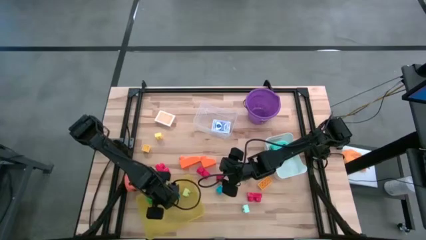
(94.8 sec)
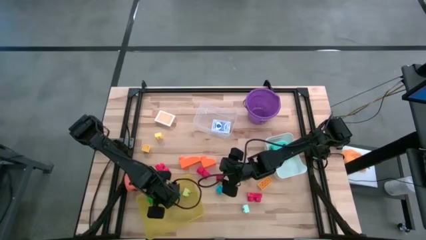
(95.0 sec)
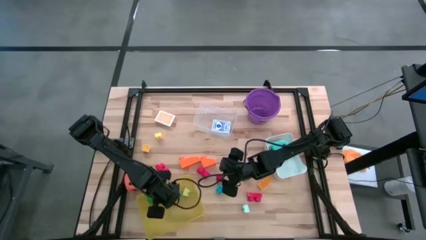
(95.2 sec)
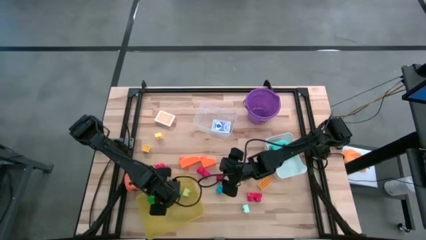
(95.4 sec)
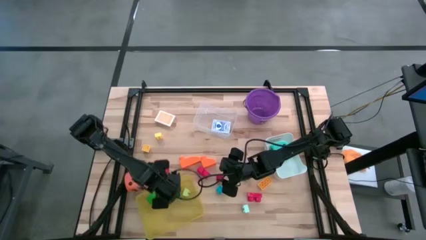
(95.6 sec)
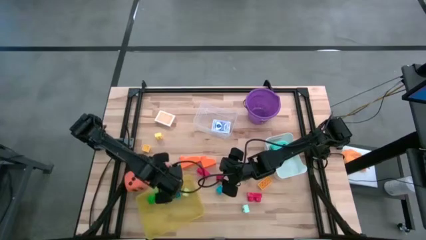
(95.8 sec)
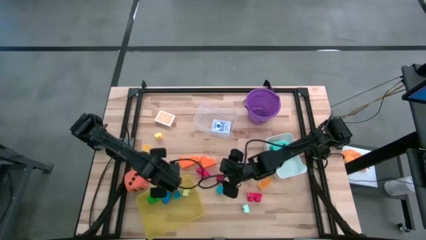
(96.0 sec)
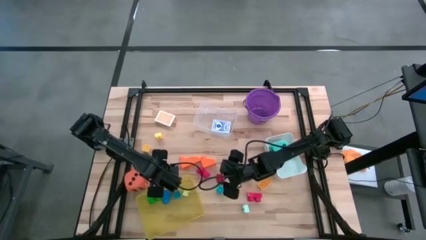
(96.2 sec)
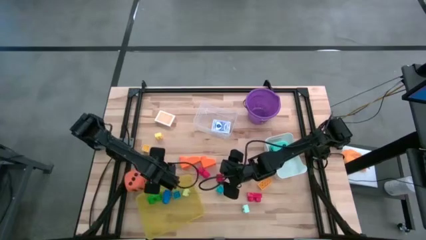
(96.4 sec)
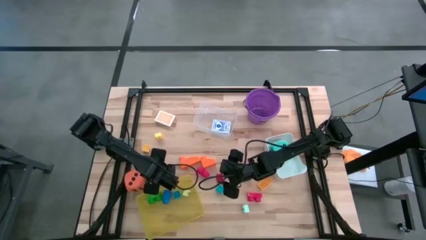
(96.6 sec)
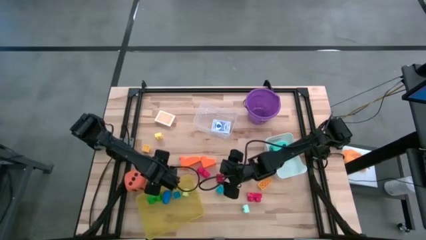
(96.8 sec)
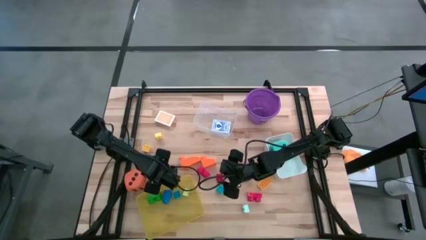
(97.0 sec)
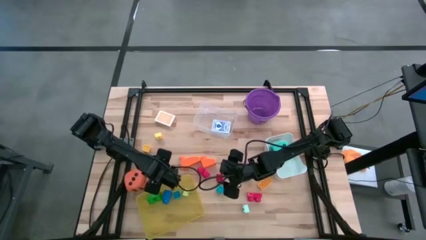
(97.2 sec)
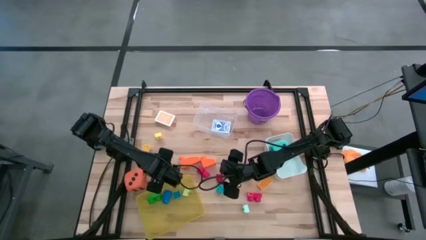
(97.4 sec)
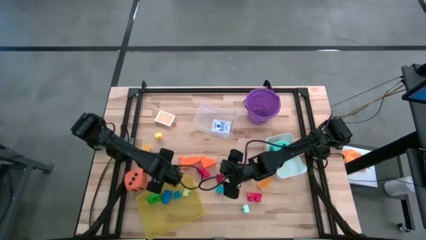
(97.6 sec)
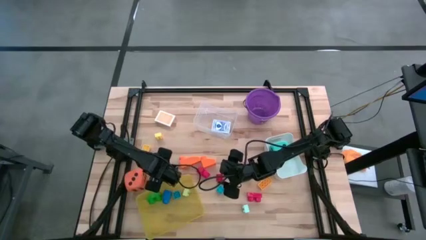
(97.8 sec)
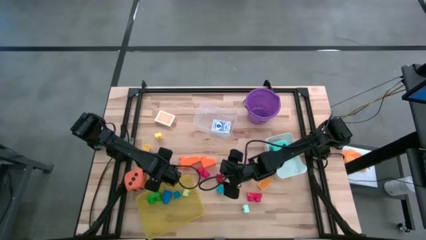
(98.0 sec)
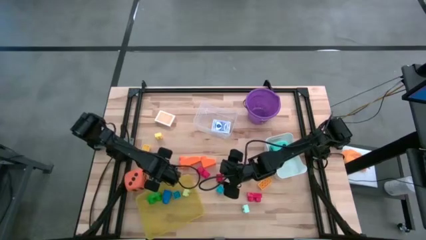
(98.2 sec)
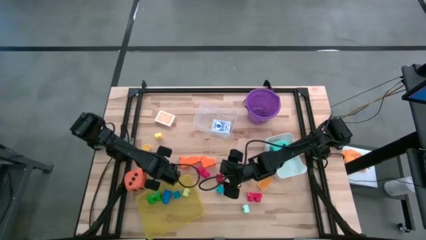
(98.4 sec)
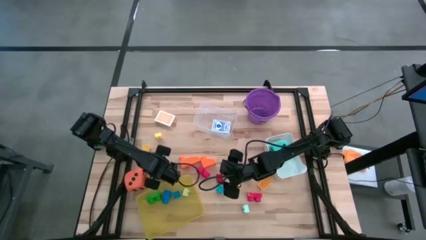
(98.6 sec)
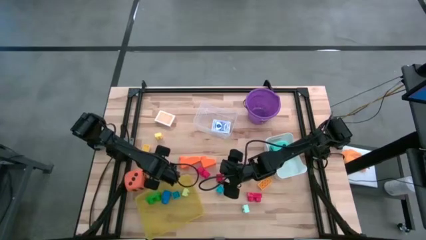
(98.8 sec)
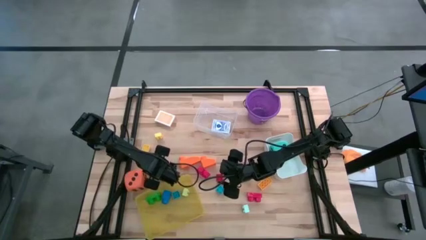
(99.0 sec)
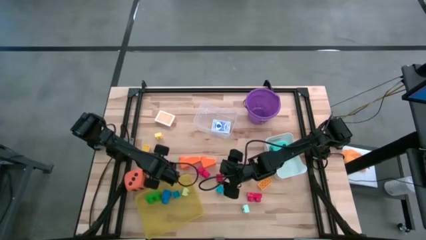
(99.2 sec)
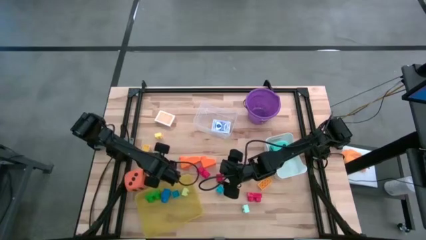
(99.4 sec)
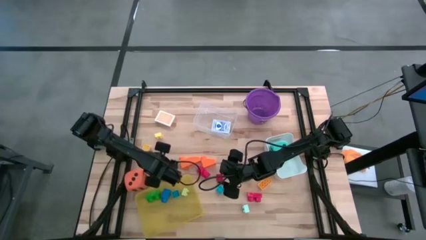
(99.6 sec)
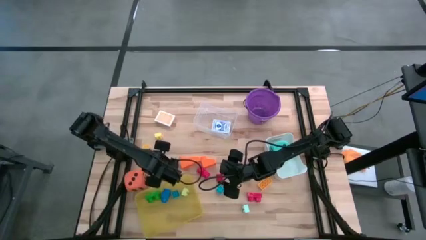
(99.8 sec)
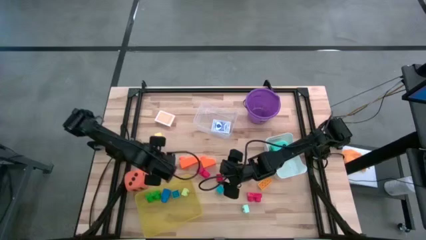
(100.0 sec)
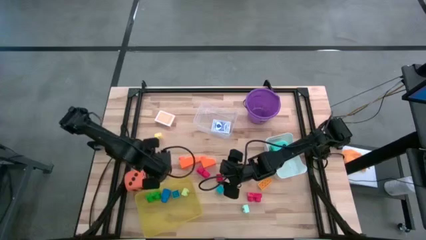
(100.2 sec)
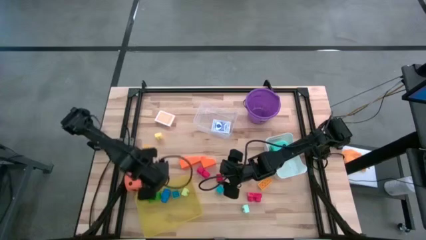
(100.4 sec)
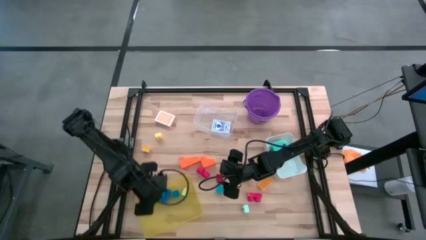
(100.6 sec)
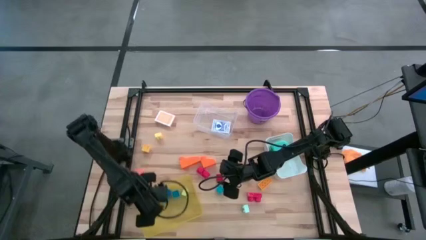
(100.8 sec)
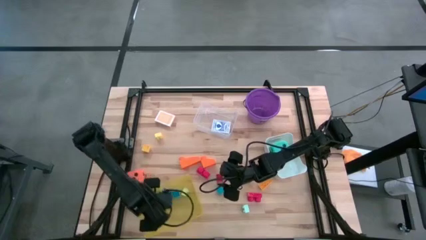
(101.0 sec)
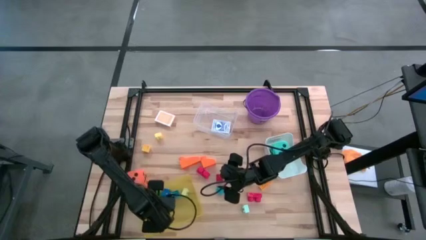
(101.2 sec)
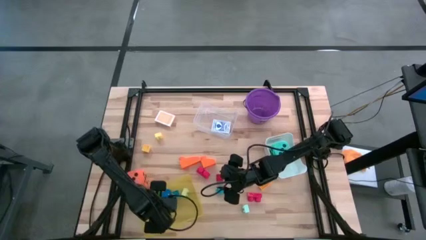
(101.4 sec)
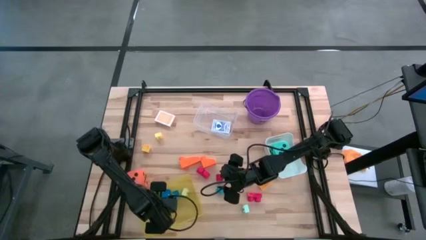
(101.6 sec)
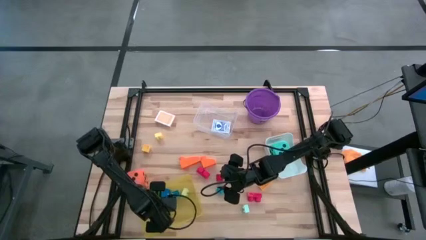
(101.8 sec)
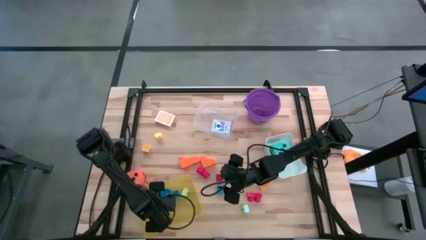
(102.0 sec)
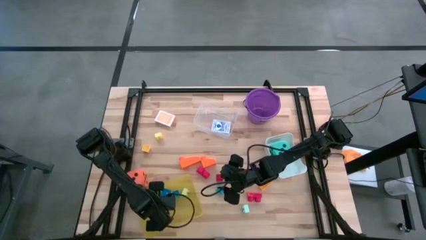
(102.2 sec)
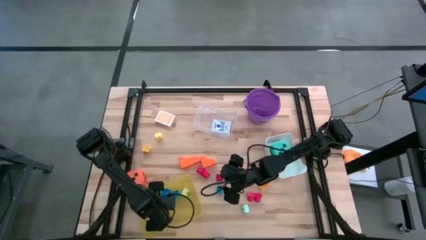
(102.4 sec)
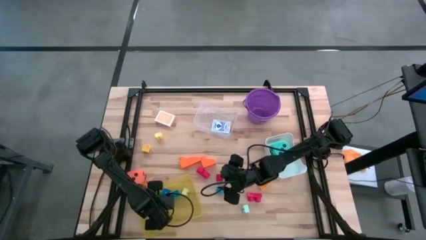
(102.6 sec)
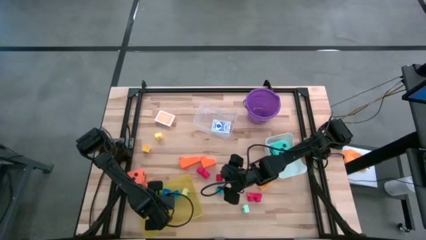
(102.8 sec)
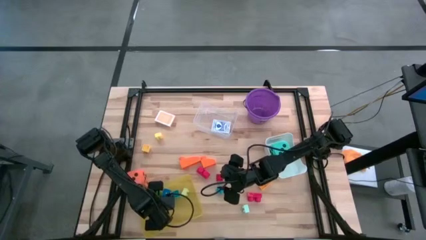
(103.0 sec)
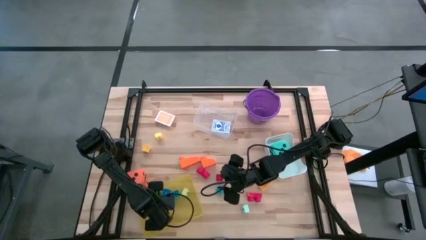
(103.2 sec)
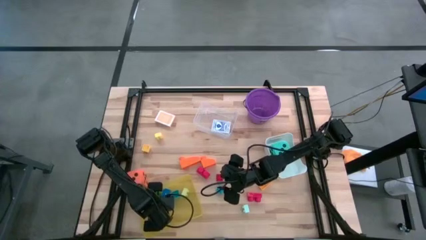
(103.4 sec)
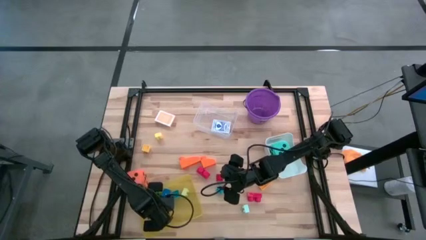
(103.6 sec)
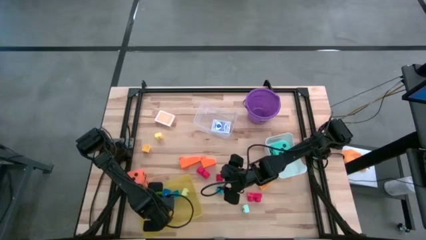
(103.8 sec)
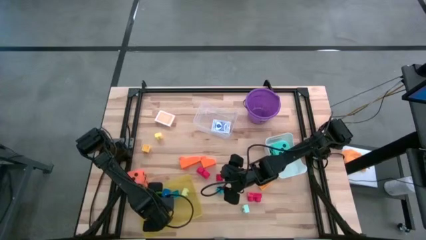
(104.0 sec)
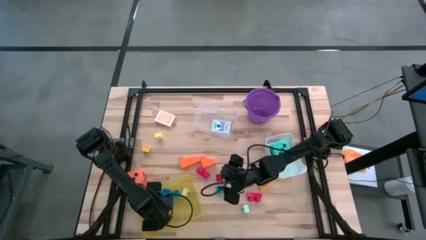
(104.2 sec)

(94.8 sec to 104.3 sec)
Task: Pick & Place Toys
Put the red game piece into the yellow bin

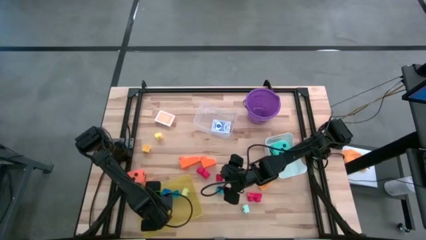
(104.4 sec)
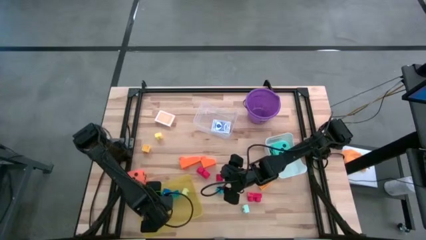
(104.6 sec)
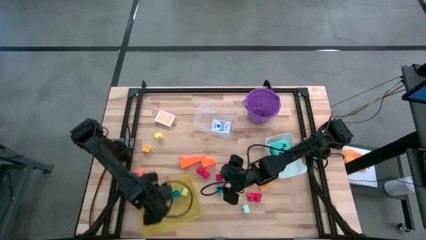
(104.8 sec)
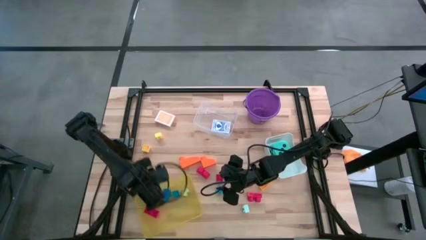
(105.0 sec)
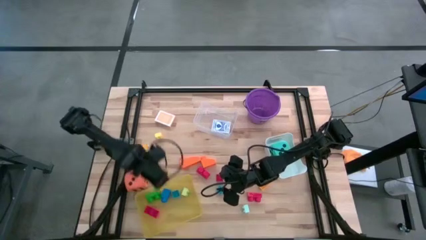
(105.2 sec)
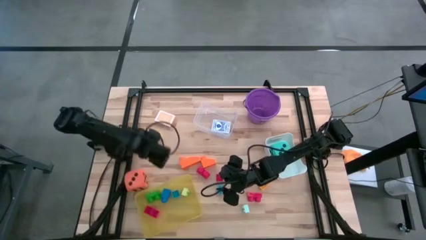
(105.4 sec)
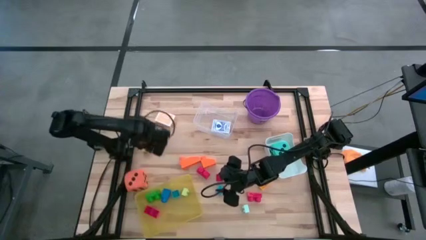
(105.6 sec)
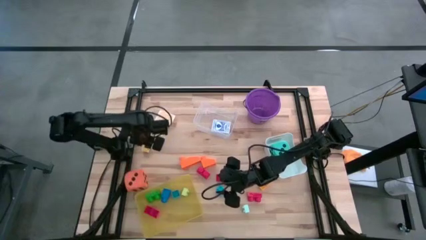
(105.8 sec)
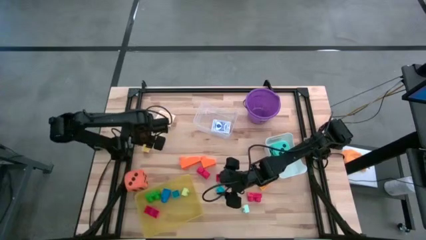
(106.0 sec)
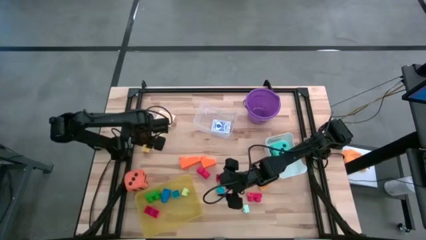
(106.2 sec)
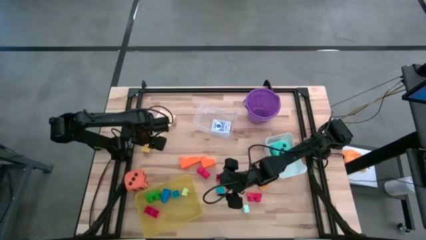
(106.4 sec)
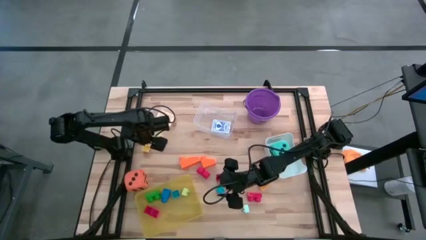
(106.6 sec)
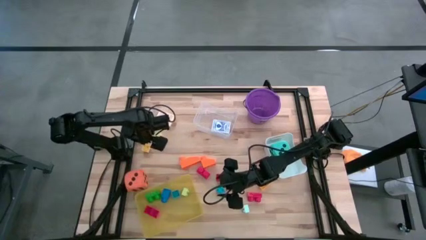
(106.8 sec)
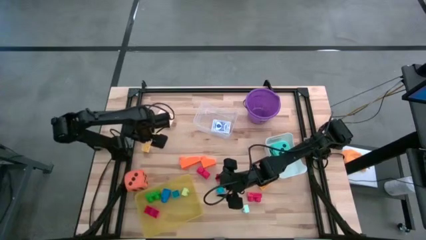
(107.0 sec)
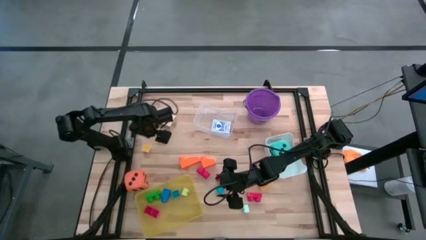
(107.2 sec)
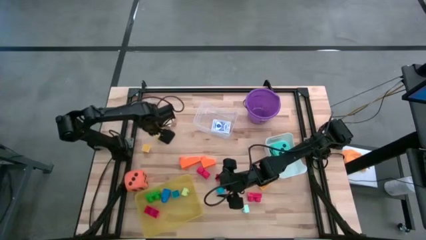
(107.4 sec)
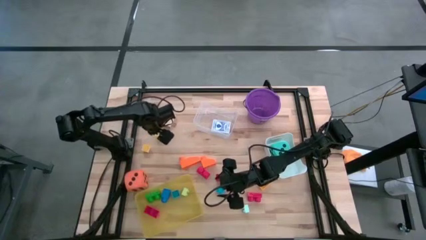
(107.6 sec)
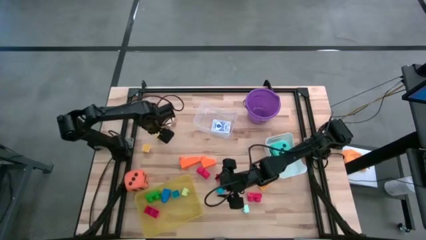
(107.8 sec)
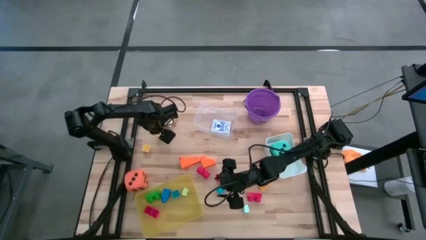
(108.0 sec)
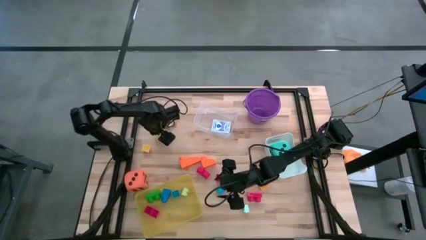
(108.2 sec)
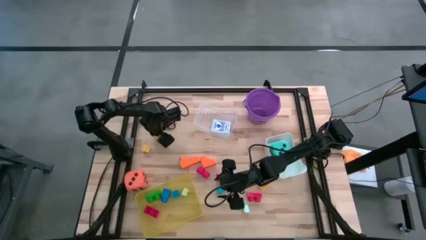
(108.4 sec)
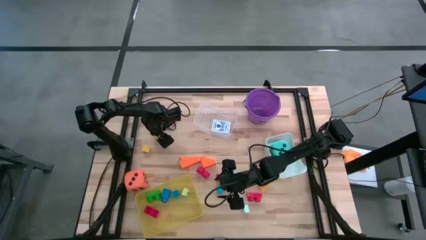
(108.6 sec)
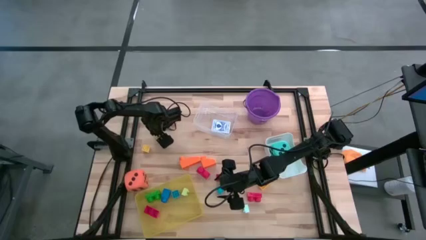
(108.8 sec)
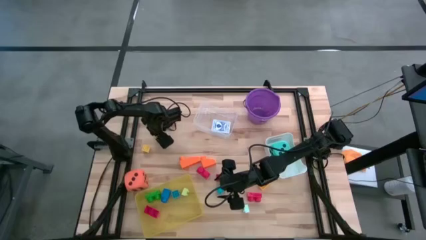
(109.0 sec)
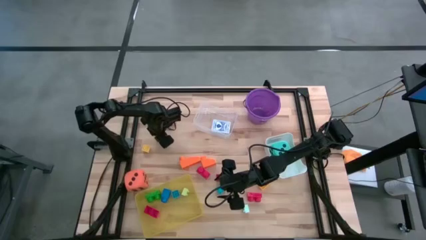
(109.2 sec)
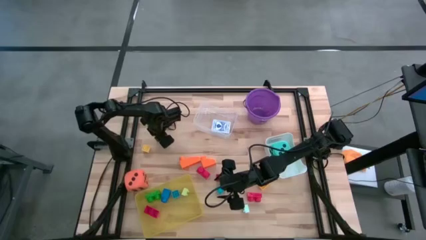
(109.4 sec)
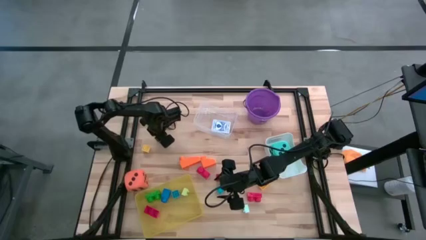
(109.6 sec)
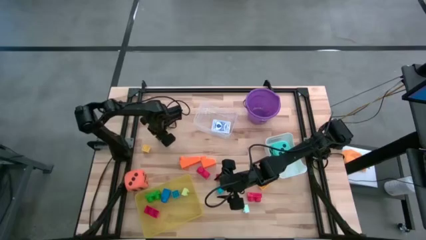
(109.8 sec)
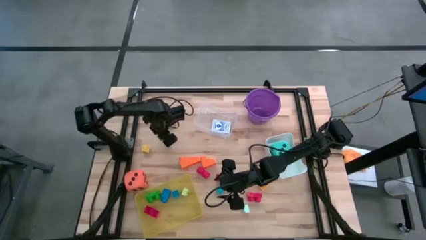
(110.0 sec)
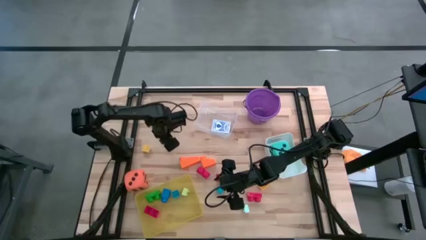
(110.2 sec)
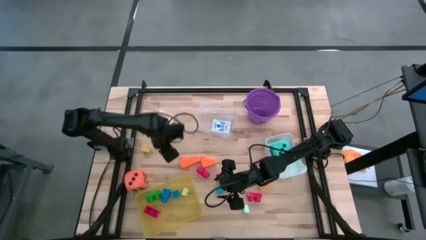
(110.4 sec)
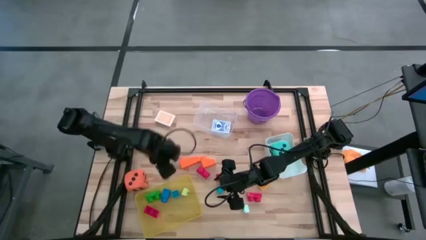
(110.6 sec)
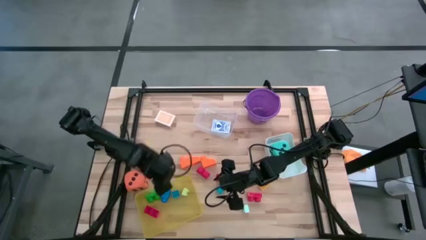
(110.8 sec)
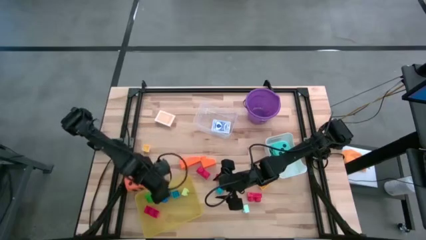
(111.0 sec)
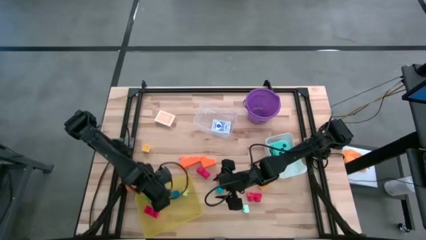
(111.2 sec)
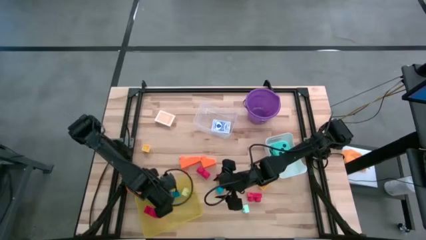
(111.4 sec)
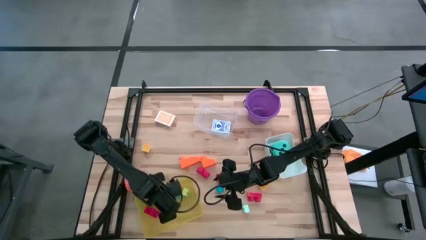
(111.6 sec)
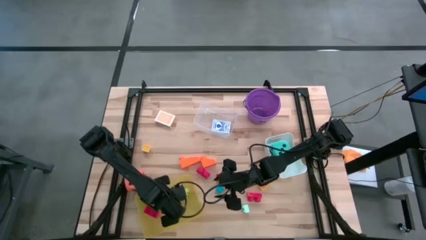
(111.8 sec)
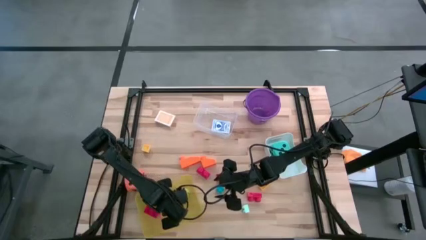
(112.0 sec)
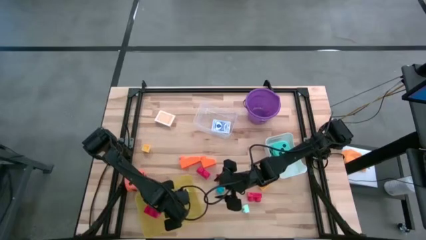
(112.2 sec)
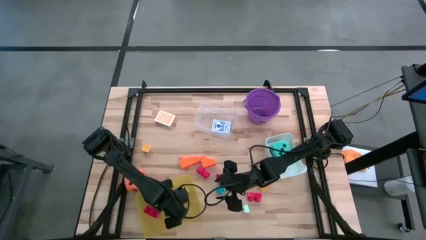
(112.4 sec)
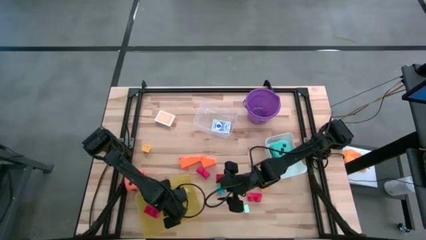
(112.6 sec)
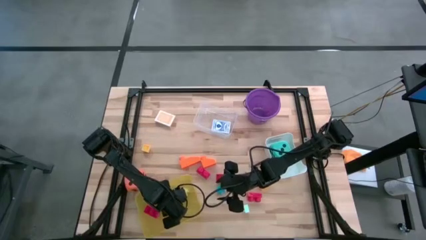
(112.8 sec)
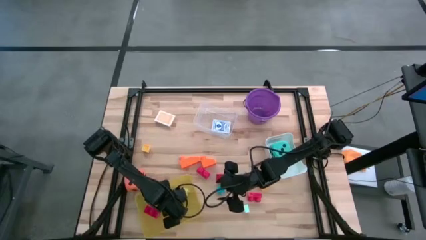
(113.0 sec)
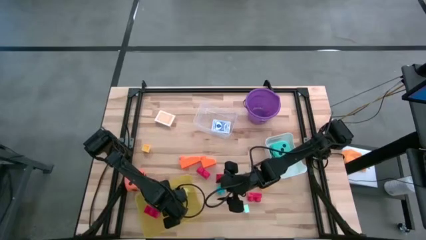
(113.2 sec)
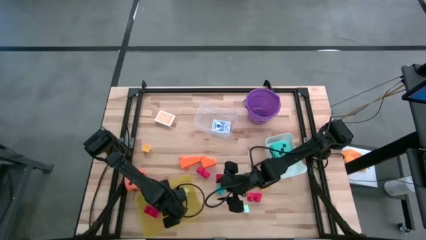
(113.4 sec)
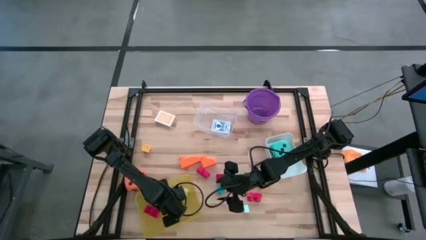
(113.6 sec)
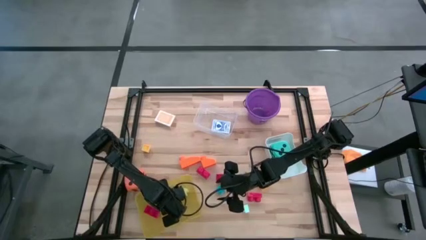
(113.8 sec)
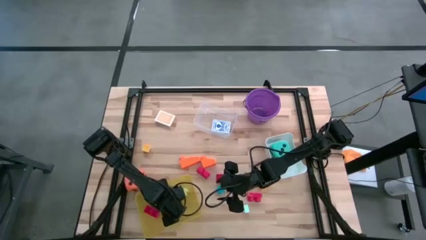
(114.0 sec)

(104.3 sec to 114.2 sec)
Put the yellow game piece into the yellow bin
